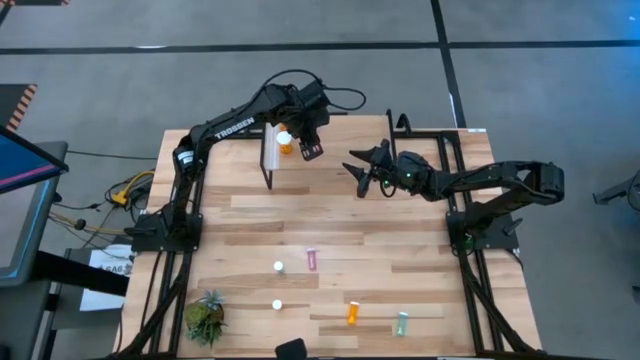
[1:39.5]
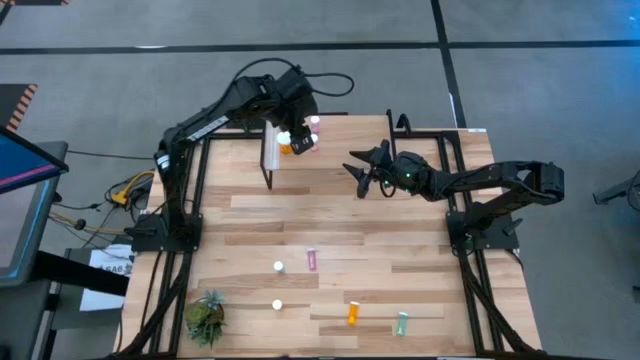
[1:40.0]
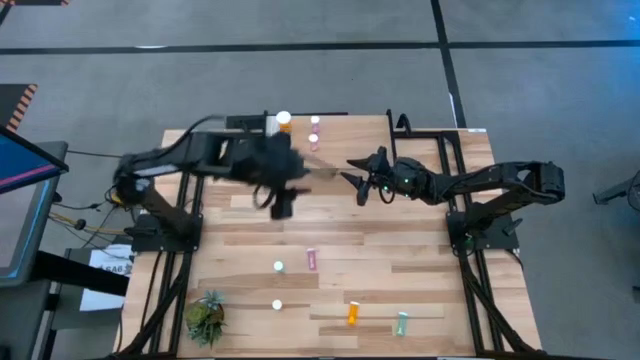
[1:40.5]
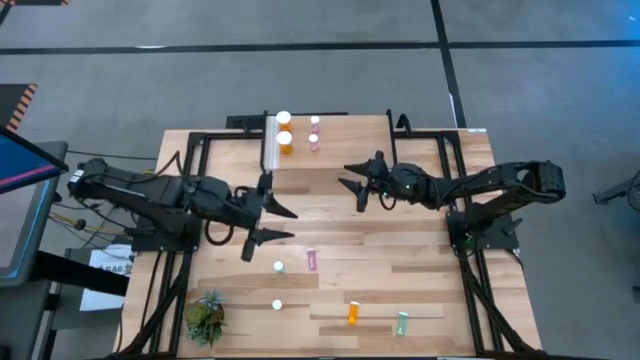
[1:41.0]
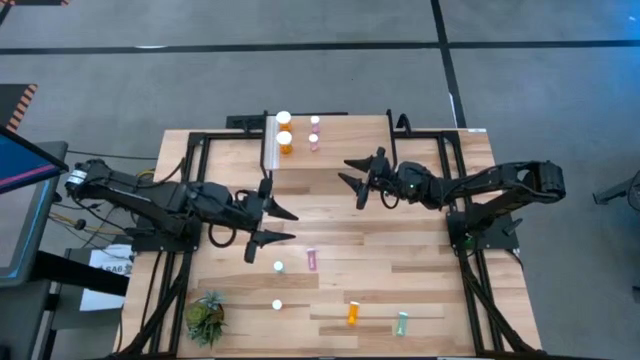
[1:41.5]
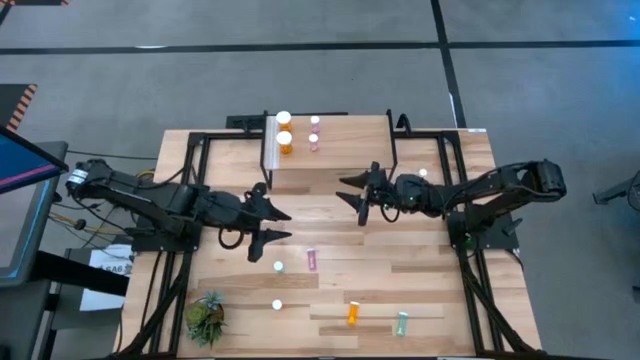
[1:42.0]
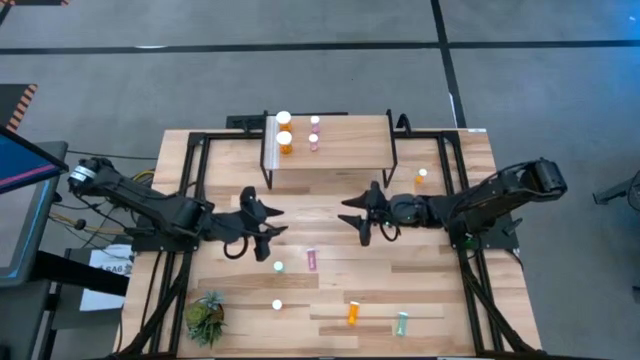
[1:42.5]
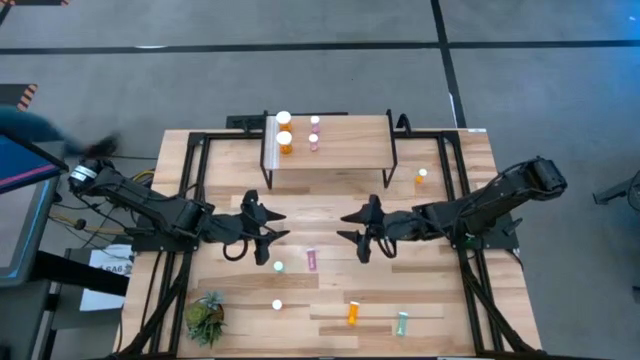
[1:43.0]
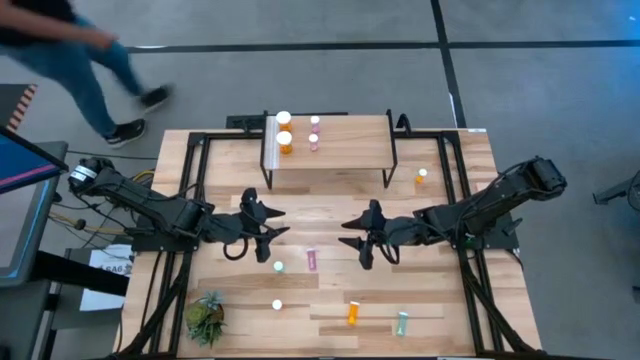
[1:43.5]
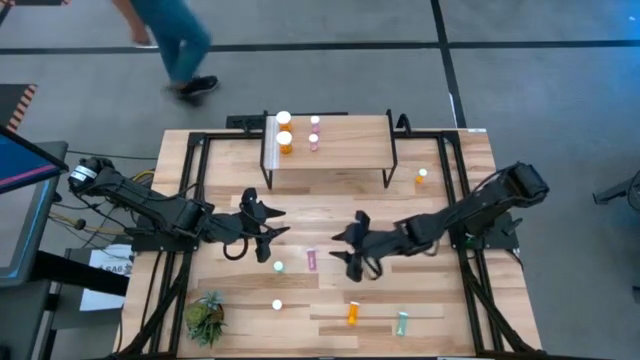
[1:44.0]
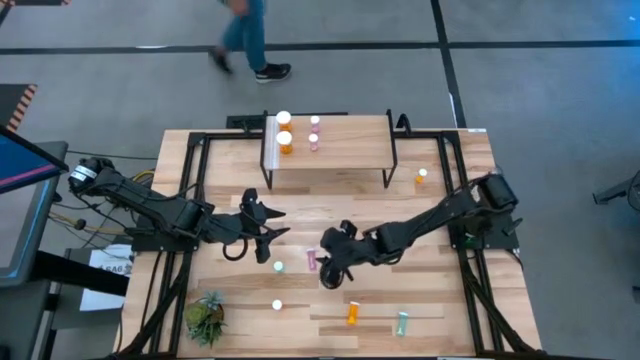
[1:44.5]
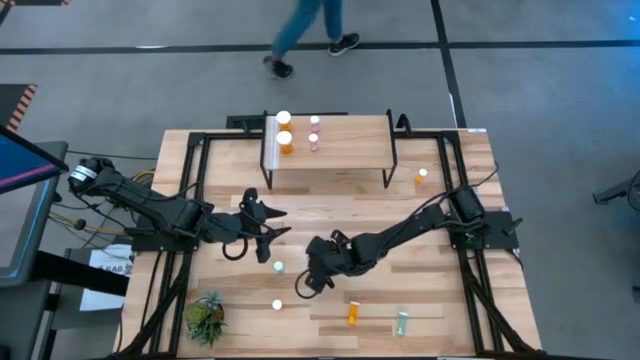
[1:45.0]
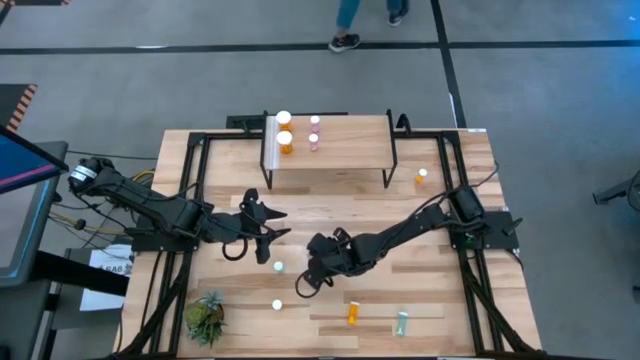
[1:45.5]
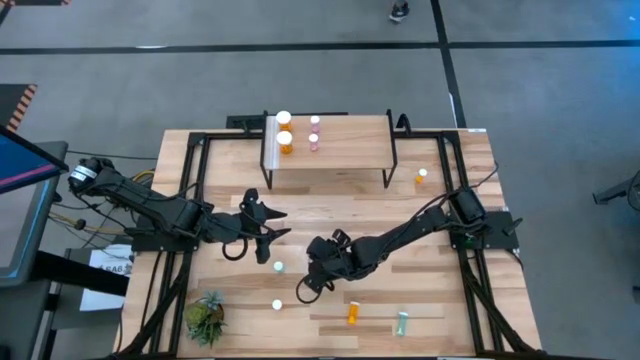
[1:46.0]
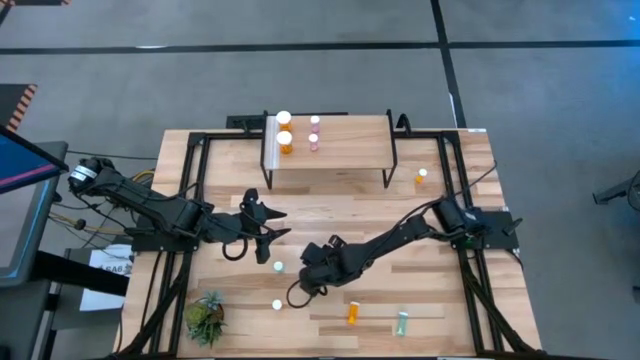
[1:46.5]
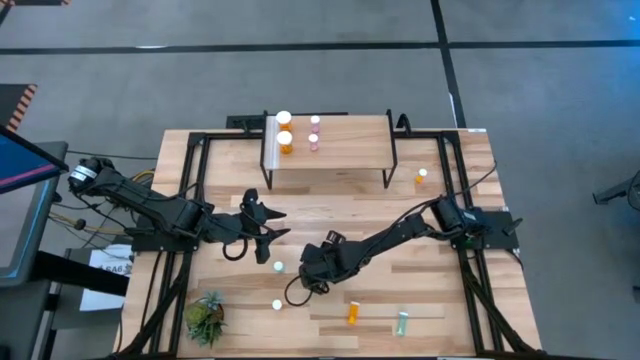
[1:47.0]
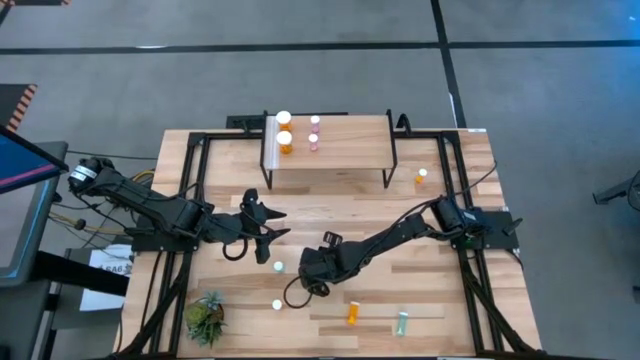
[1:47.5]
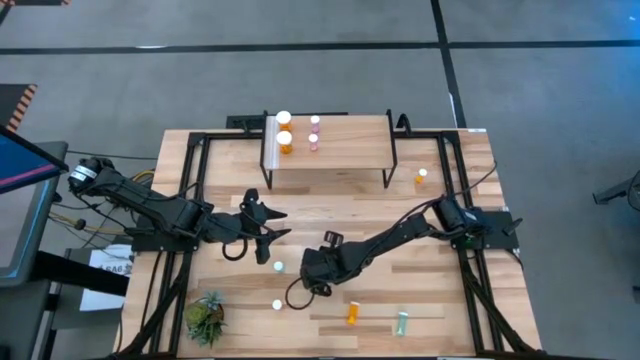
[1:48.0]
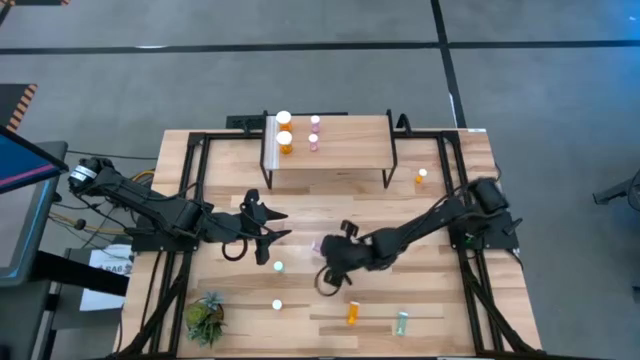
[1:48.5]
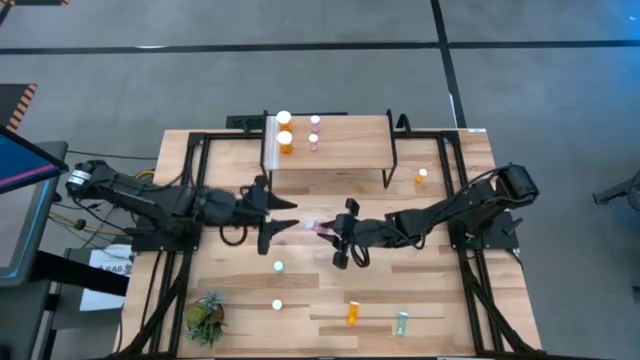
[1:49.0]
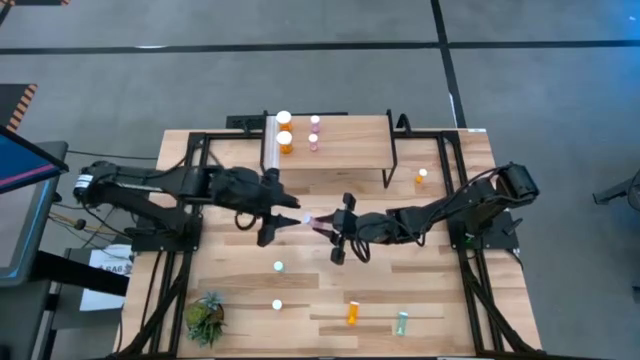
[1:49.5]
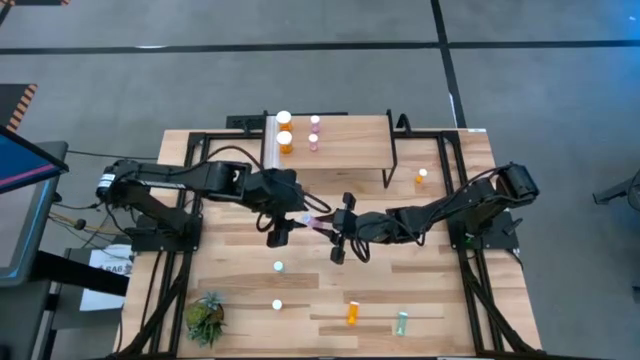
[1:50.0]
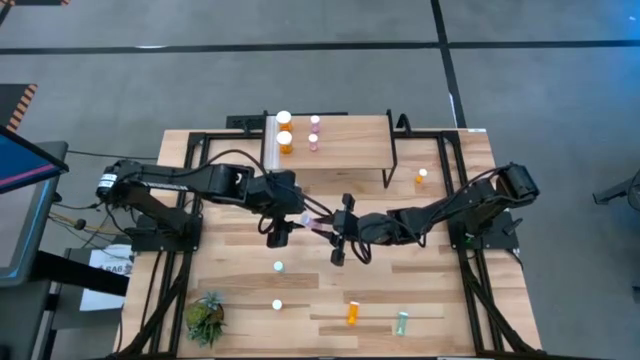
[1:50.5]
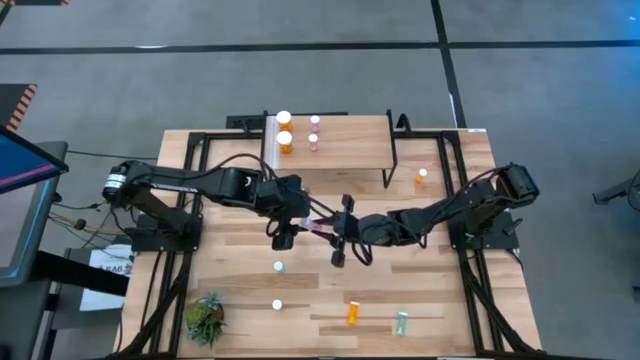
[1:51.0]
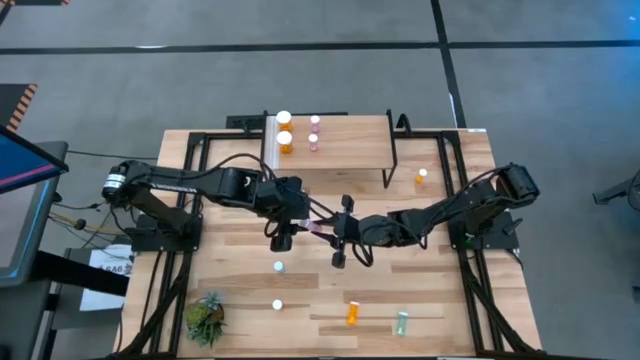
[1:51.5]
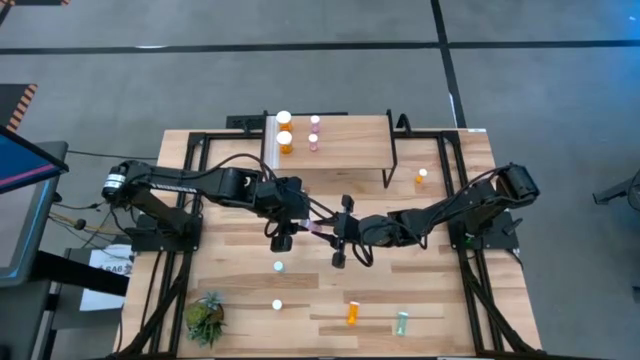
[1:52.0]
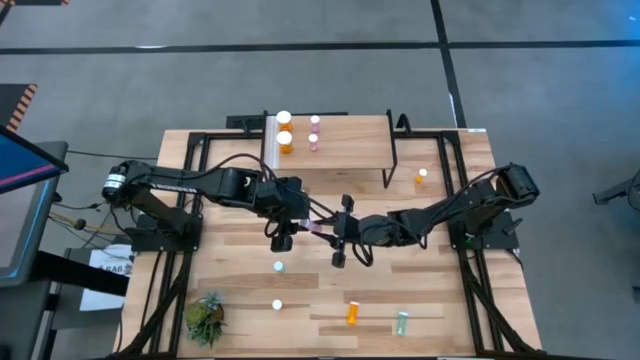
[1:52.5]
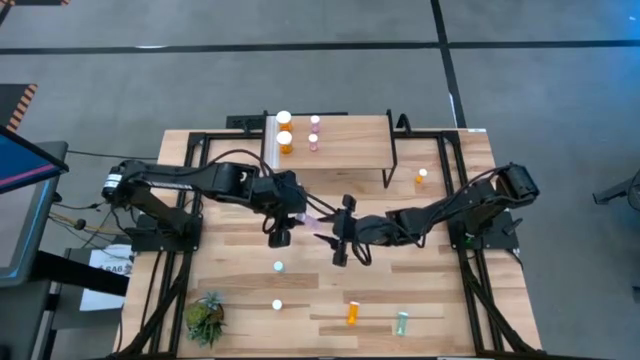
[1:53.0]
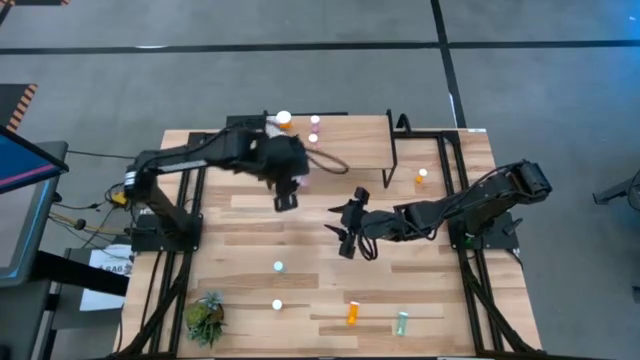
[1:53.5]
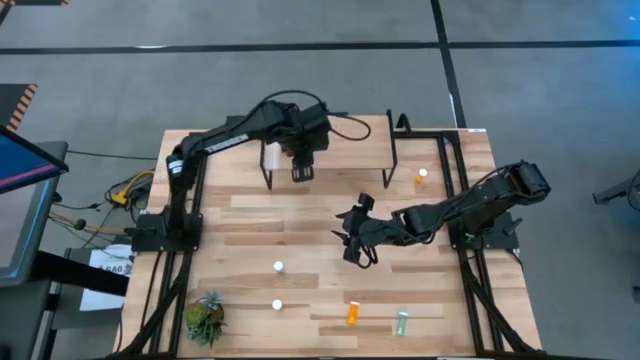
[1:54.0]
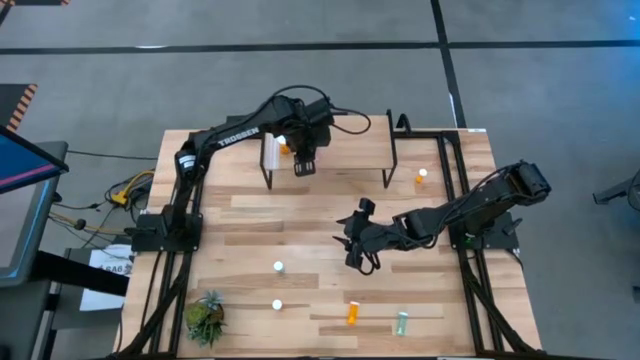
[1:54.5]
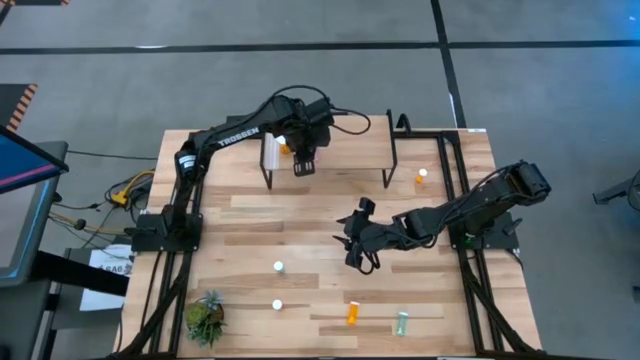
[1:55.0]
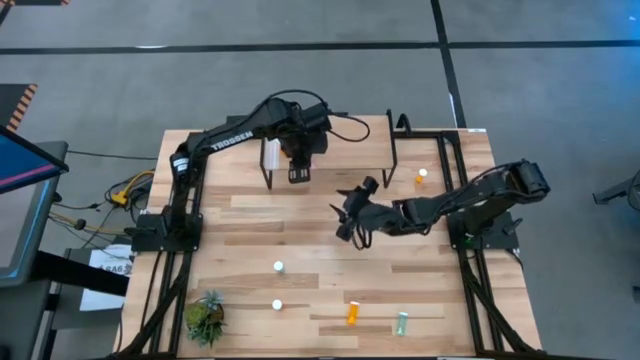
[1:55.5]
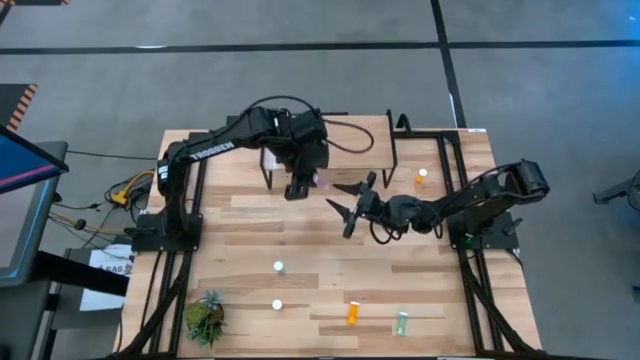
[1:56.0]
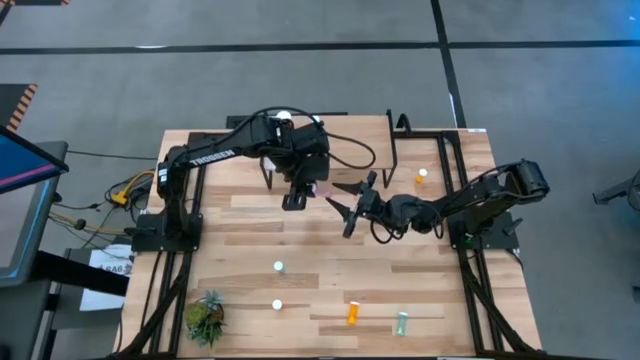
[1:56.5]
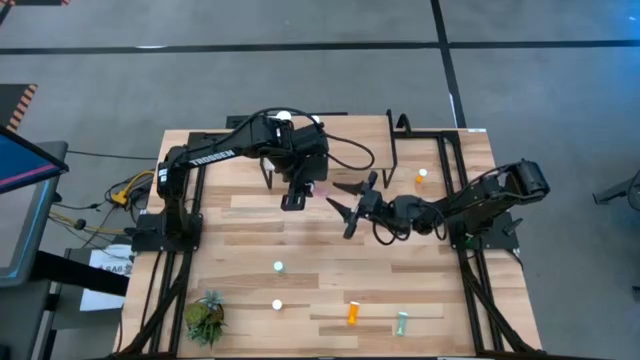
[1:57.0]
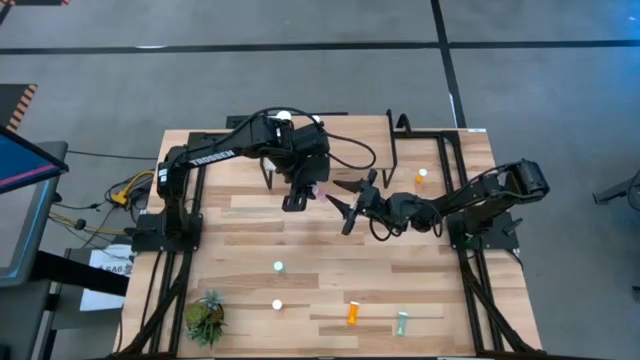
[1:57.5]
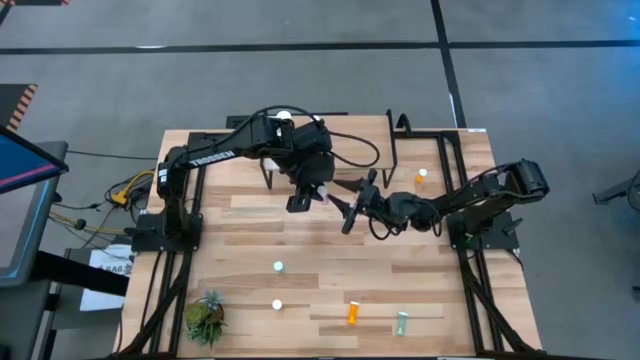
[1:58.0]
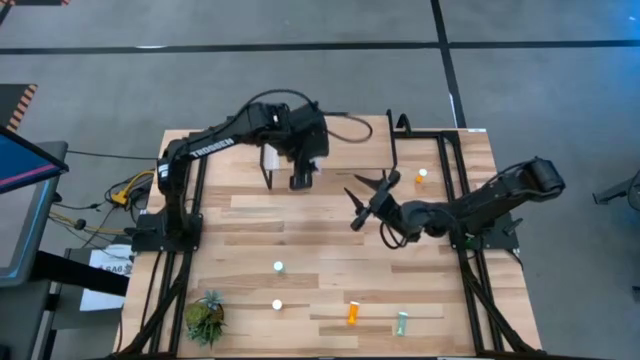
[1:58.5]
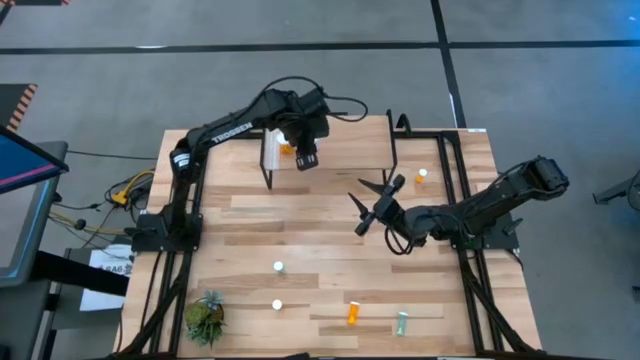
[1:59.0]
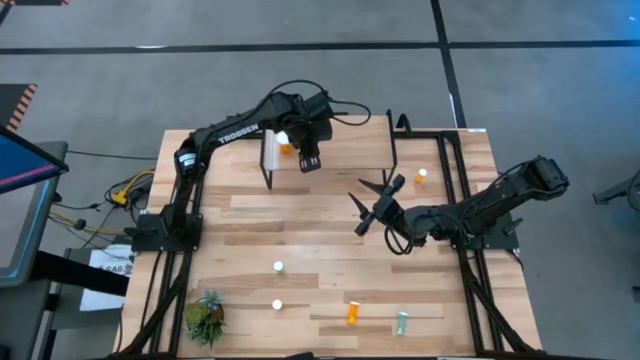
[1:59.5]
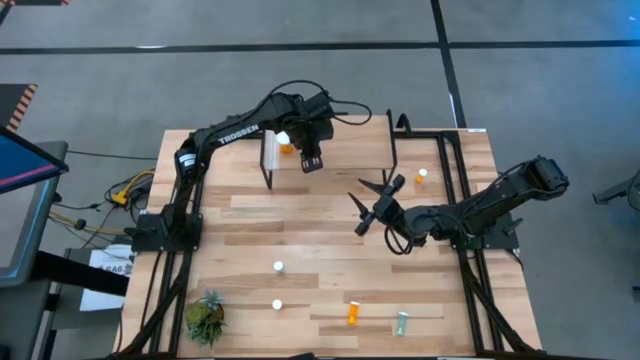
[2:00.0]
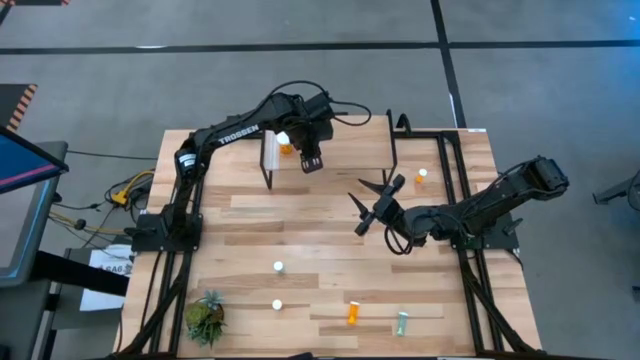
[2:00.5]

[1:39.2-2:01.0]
Task: Pick and place medicine bottles onto shelf by color
Put the pink pill bottle on the shelf aligned with the other pink pill bottles
